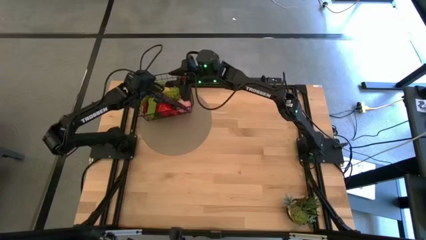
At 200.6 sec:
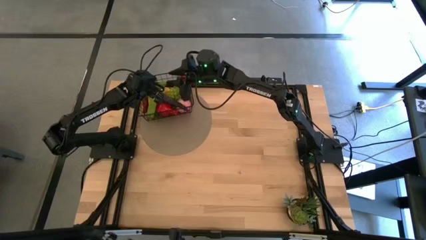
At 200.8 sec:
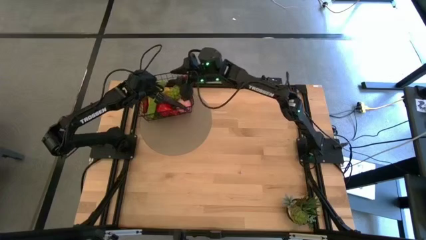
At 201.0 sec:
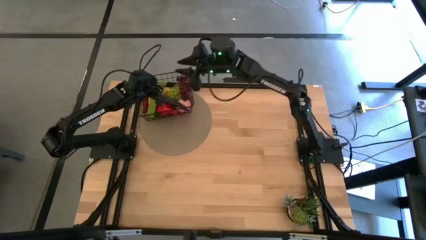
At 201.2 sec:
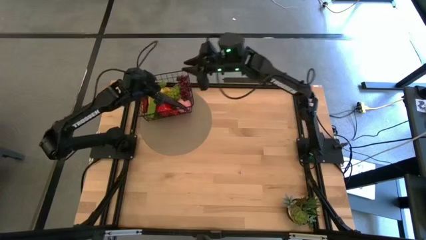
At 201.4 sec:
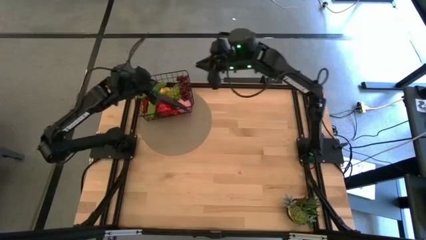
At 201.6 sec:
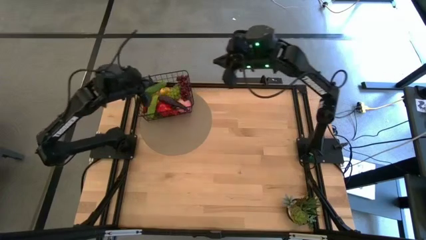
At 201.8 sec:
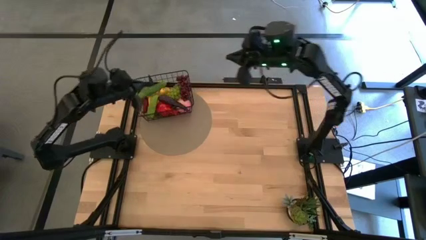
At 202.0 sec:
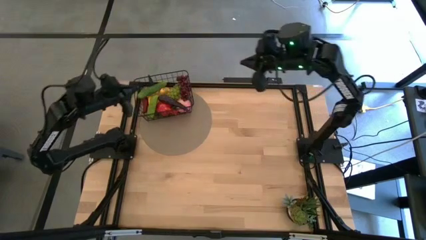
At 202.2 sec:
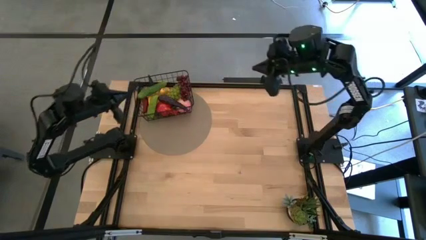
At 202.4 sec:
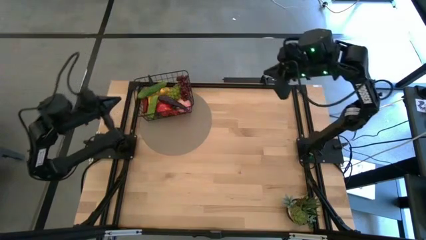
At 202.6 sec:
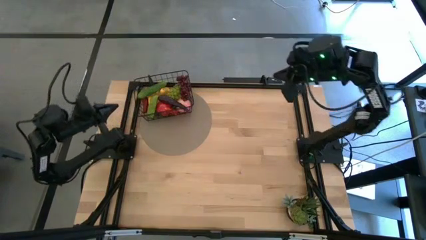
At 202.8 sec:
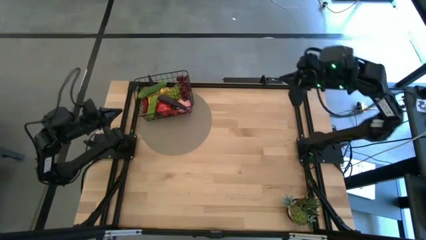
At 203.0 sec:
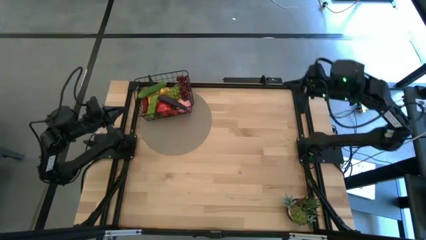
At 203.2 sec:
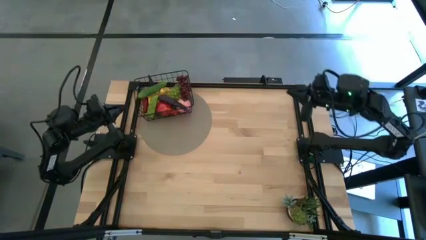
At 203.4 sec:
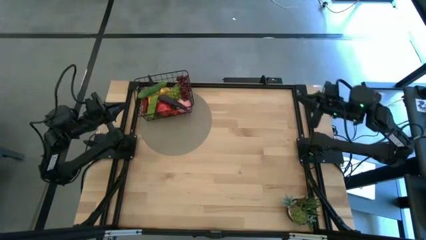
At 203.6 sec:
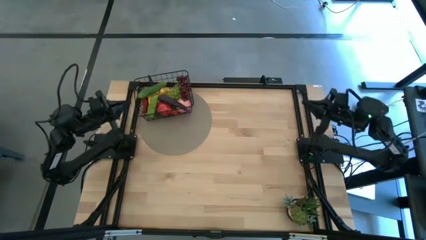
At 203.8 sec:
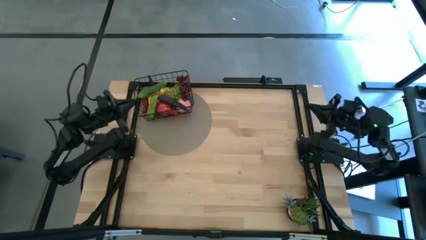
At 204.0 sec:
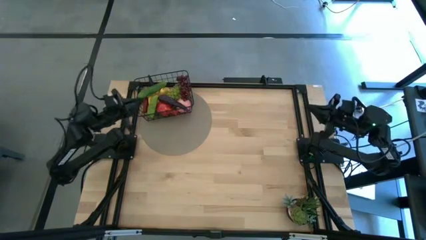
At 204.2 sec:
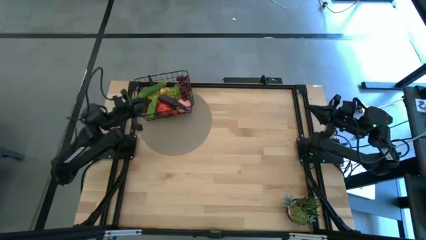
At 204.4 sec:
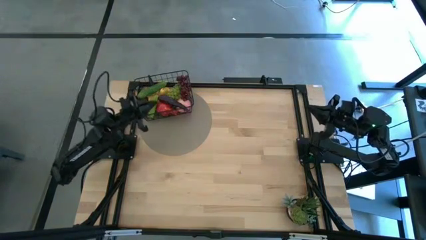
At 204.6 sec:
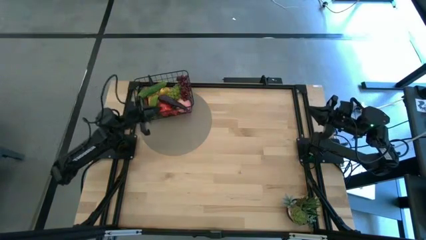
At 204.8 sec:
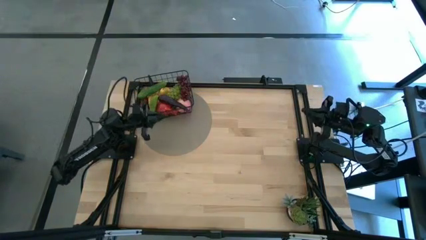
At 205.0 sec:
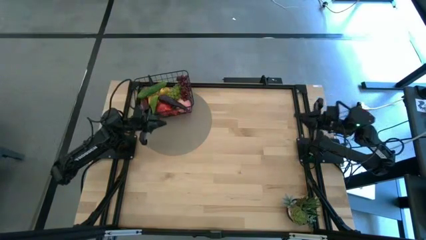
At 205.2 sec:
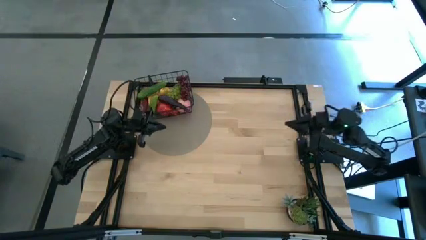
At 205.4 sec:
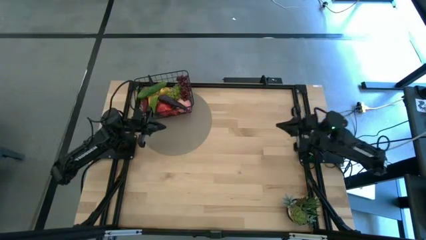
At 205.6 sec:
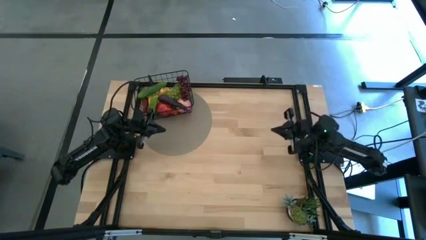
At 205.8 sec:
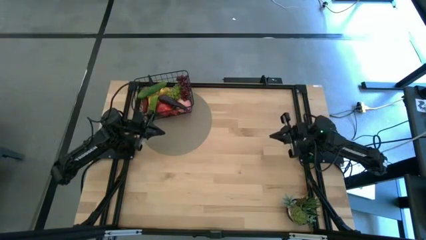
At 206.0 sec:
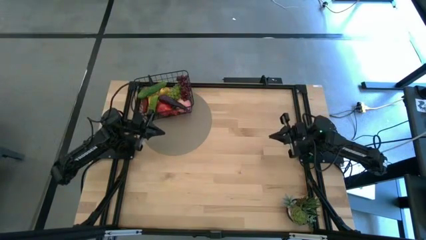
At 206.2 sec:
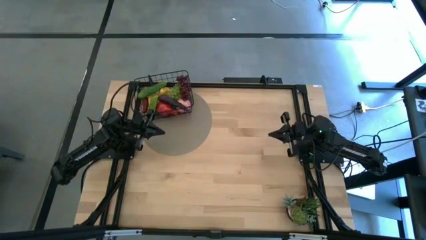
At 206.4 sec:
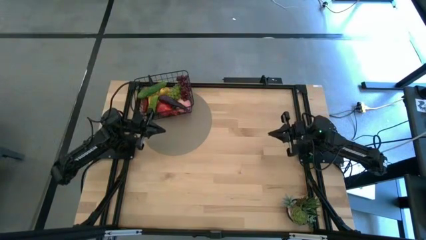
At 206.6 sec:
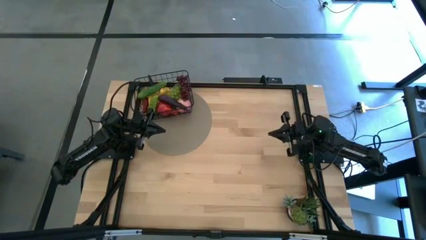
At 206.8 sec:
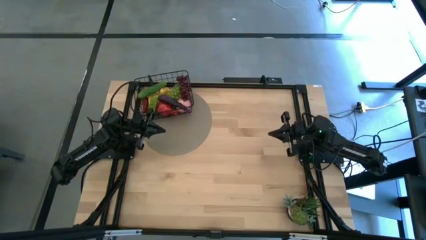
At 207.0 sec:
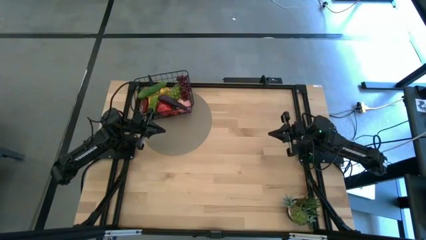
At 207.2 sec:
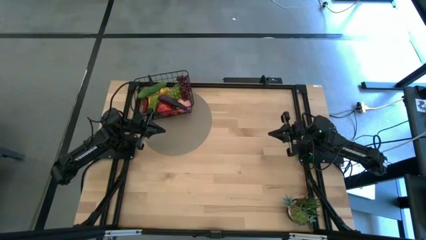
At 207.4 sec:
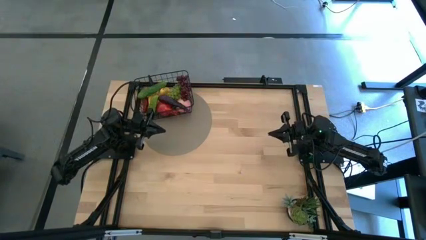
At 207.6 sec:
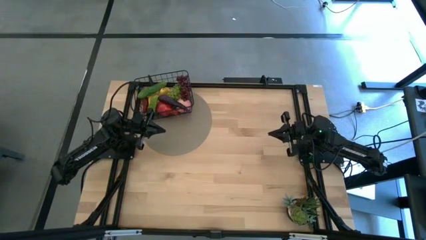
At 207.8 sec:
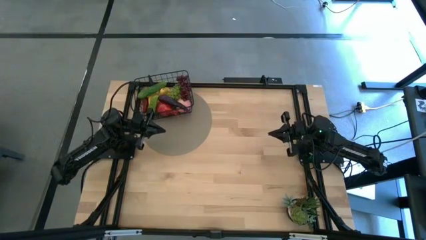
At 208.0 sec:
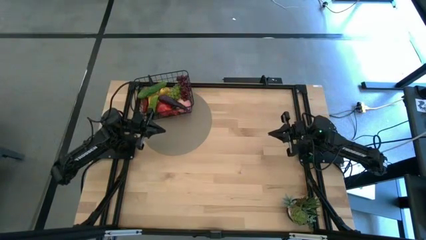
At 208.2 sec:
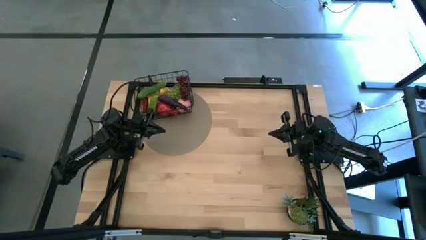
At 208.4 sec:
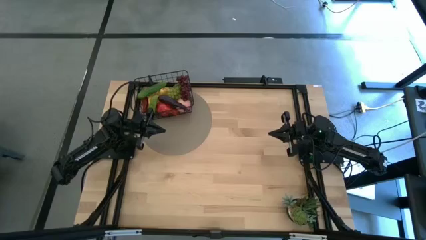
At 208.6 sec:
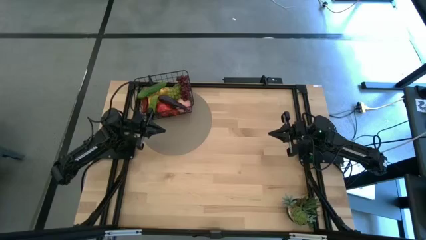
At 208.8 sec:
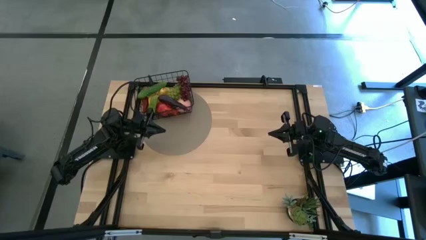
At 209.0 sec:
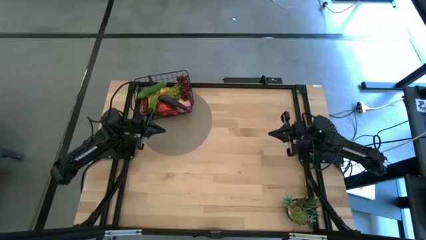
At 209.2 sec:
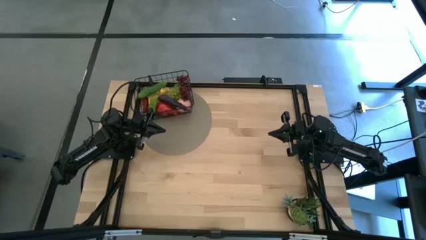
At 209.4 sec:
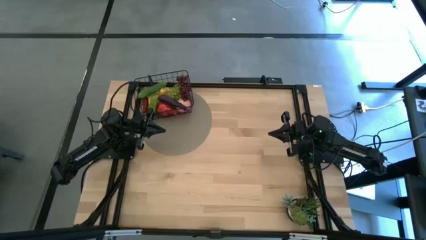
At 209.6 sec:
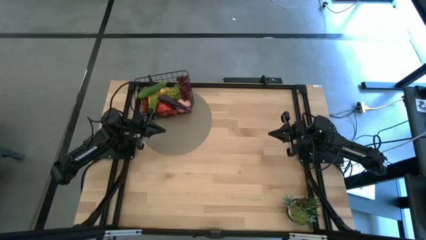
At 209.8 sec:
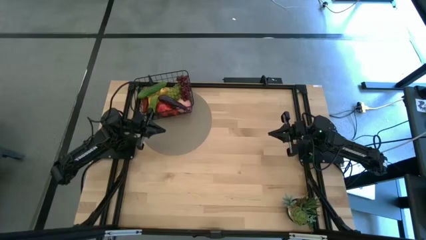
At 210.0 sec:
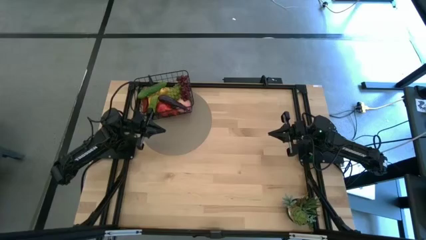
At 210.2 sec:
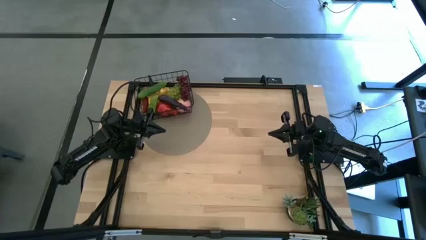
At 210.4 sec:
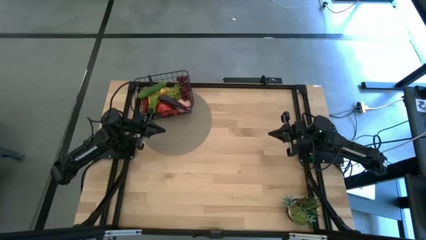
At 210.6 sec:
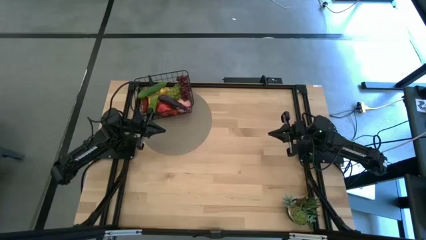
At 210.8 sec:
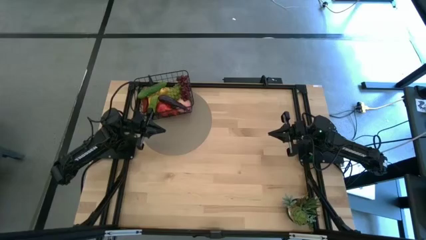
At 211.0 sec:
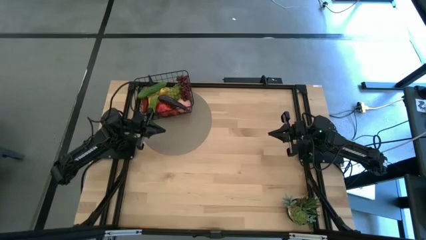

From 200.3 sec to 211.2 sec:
Task: Build produce basket
Return to Home Position

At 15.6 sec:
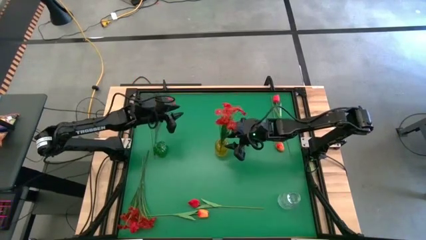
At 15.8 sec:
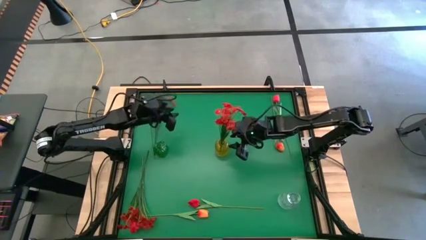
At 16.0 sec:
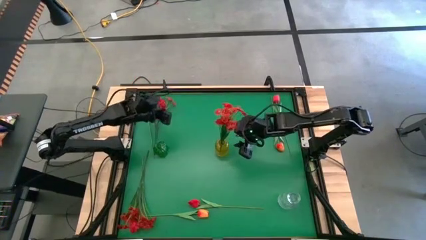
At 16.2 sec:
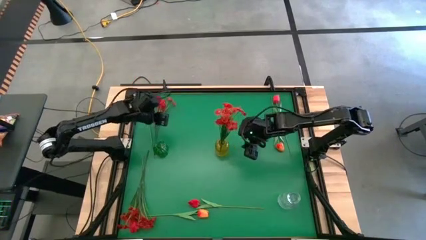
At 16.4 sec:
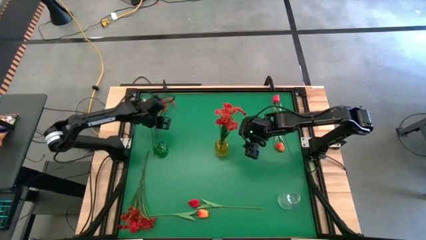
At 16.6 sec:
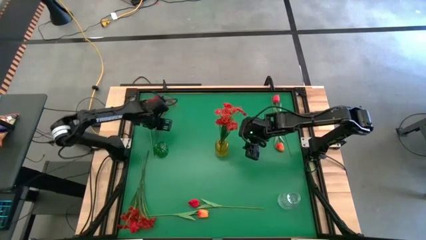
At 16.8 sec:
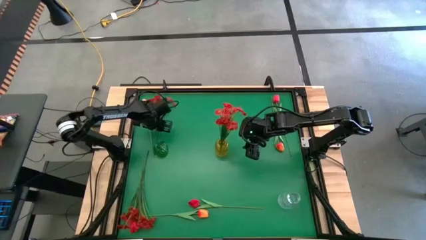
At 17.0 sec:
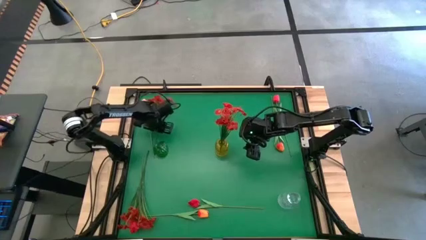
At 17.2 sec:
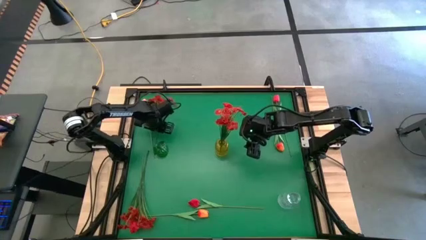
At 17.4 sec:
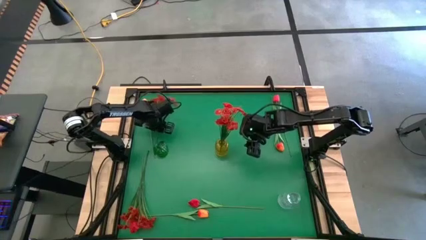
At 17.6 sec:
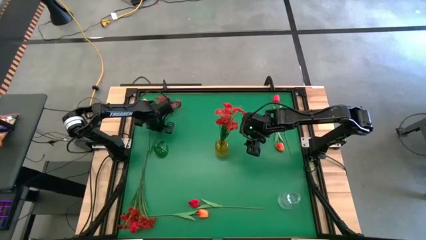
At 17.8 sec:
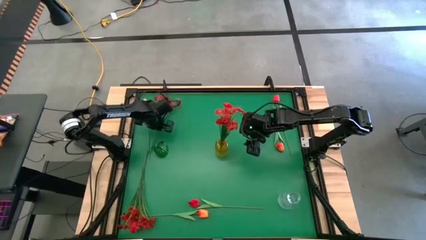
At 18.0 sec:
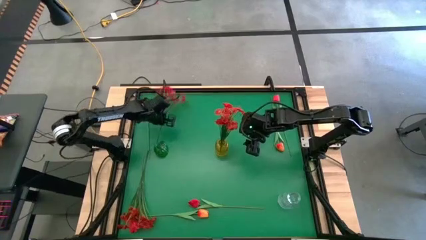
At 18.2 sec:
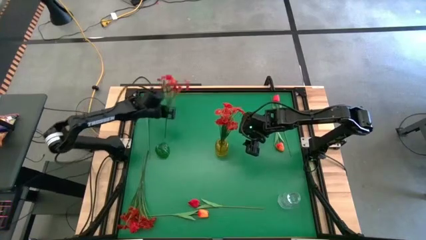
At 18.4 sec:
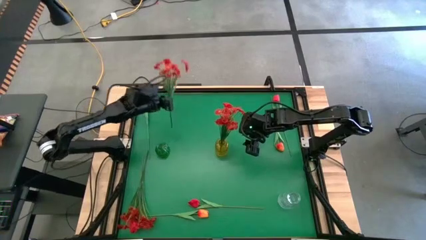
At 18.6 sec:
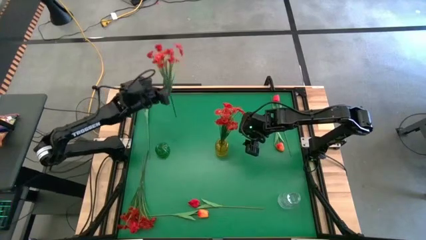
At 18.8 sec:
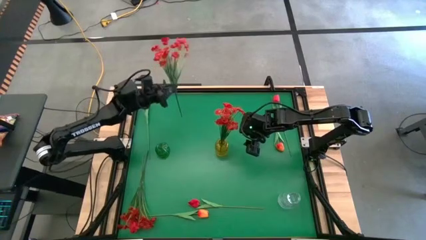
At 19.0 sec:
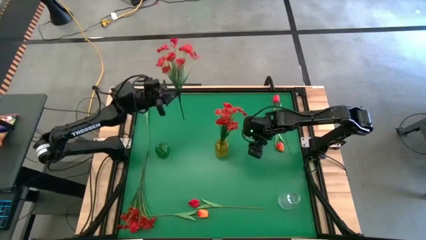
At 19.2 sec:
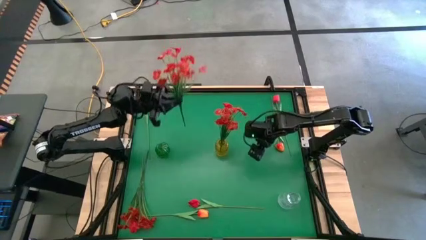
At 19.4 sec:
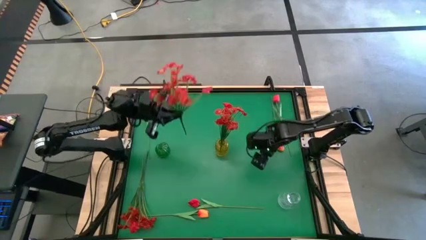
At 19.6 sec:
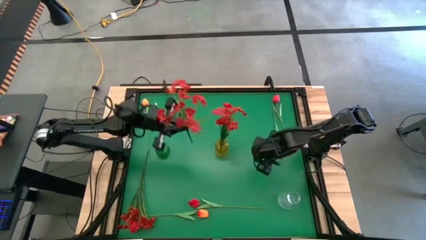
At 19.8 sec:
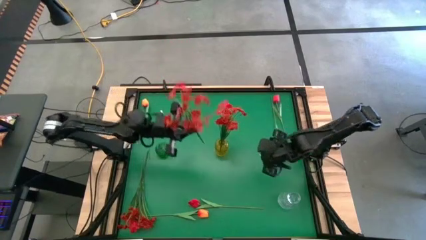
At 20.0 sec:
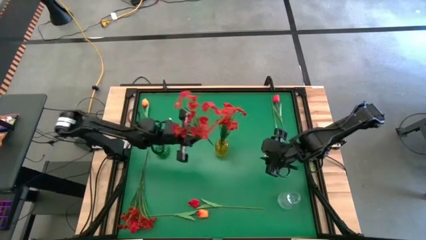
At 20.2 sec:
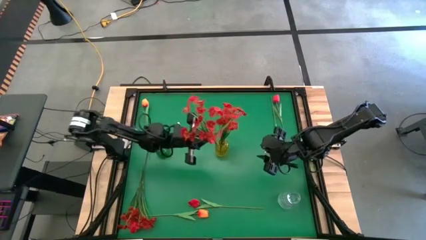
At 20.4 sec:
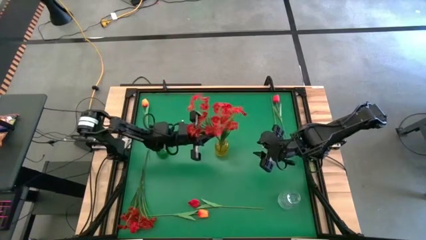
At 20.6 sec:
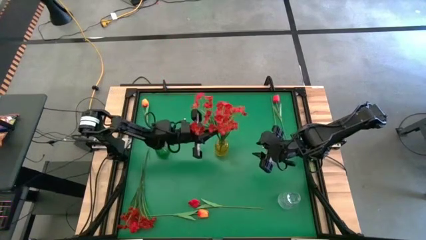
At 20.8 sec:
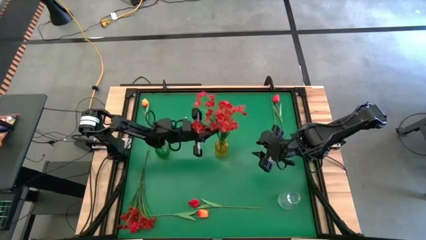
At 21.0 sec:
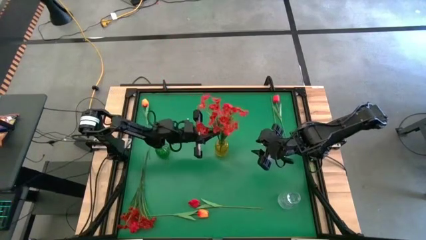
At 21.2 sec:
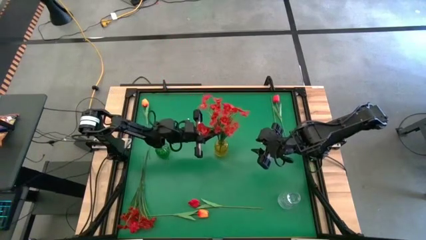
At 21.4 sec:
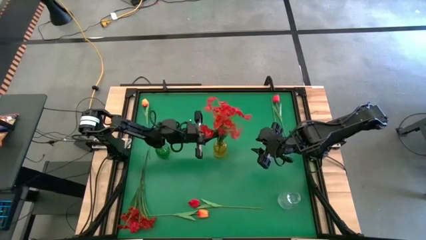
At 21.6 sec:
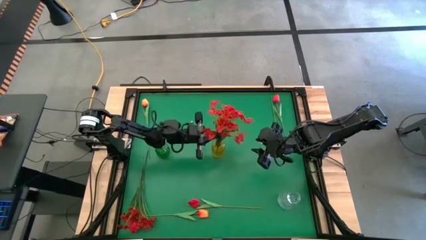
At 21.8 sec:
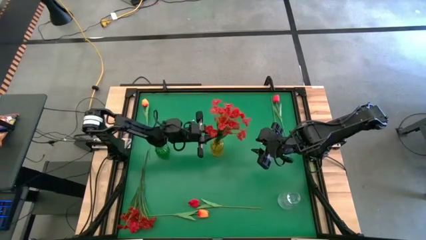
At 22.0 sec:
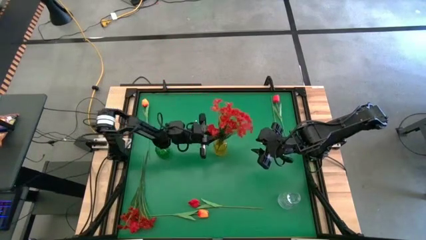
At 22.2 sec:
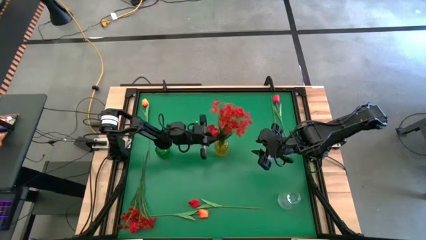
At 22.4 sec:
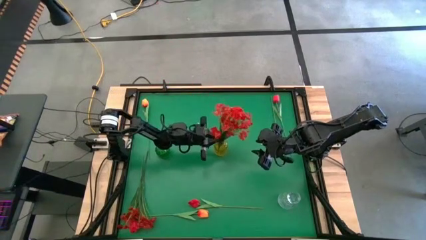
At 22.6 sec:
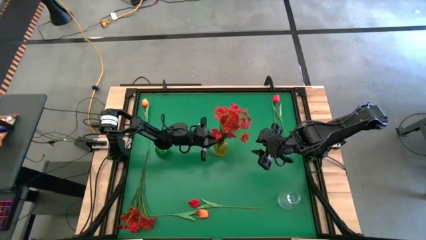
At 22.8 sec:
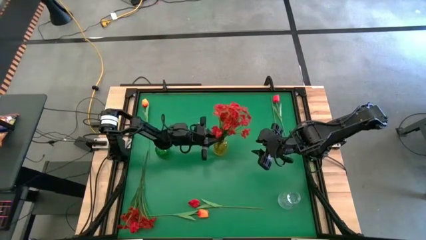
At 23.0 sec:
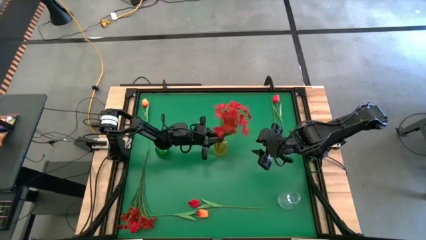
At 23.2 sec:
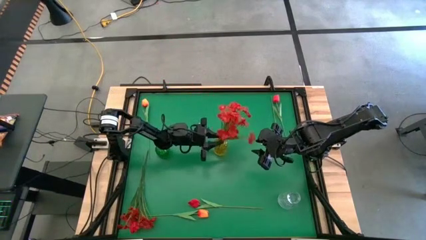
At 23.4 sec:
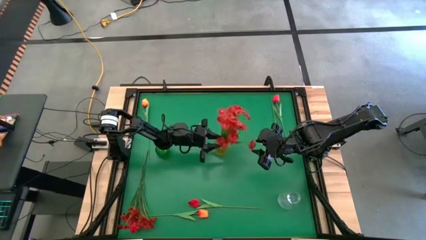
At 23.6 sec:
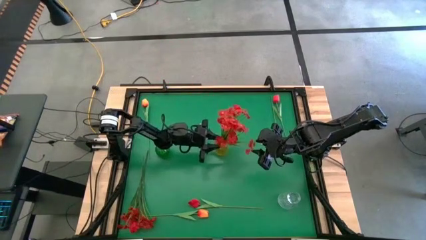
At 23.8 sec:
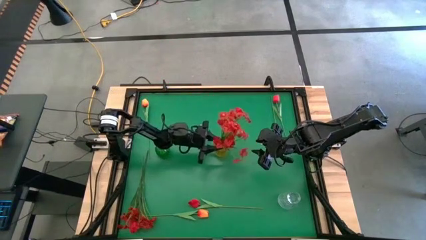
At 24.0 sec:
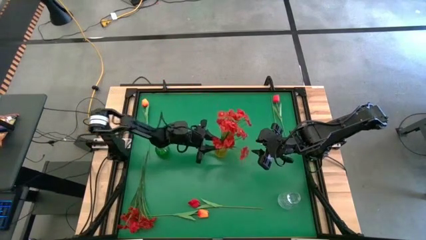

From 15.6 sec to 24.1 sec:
Task: Sort flowers into vase by color
Put the top red flower into the yellow vase
